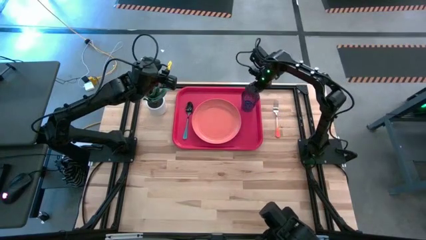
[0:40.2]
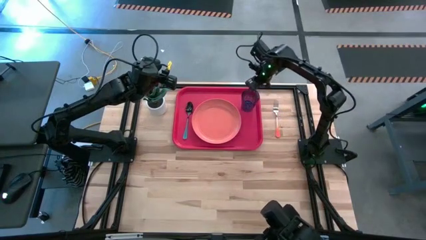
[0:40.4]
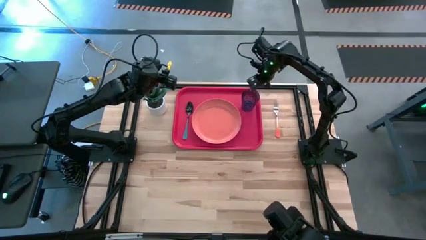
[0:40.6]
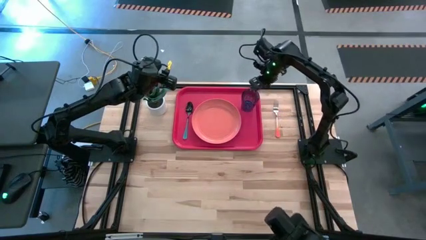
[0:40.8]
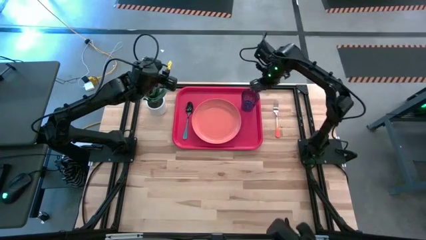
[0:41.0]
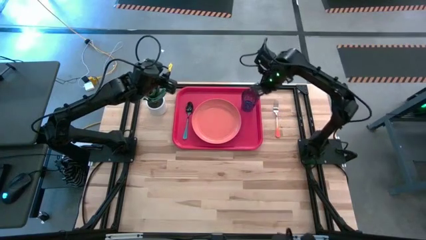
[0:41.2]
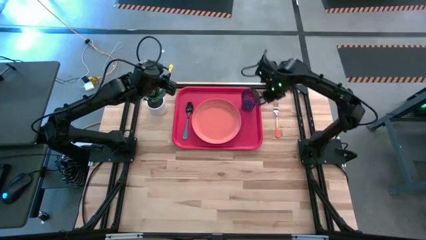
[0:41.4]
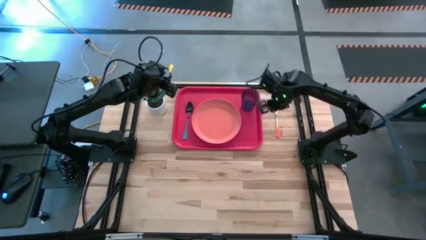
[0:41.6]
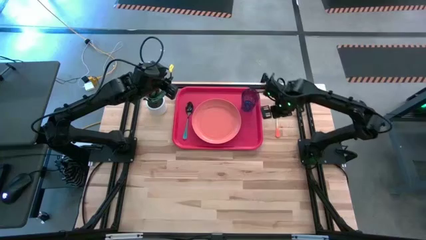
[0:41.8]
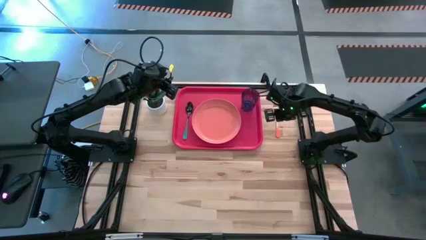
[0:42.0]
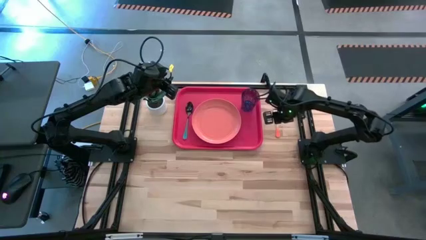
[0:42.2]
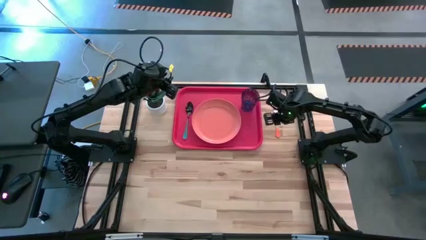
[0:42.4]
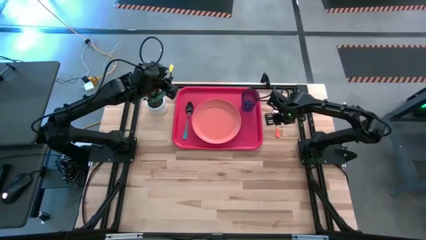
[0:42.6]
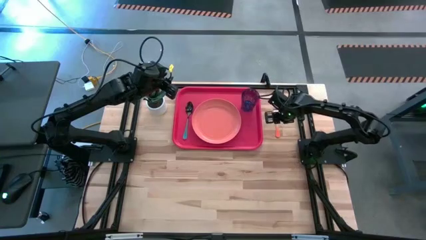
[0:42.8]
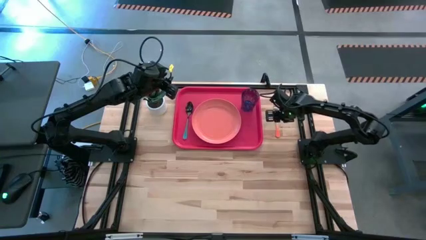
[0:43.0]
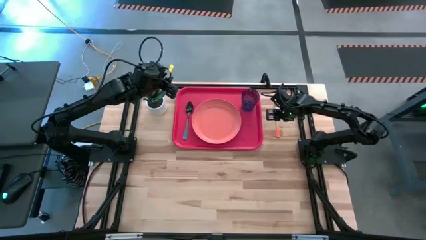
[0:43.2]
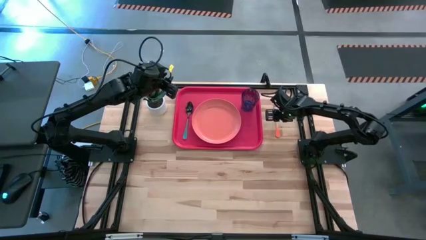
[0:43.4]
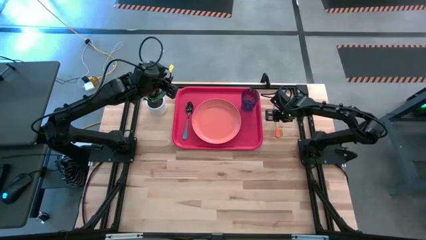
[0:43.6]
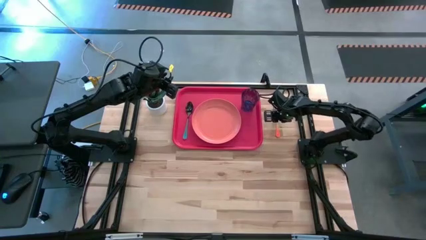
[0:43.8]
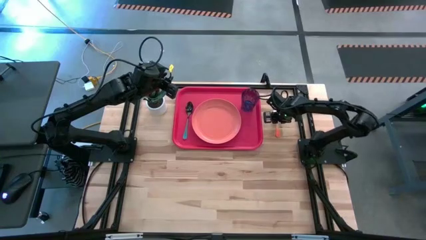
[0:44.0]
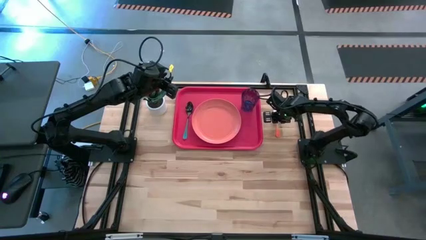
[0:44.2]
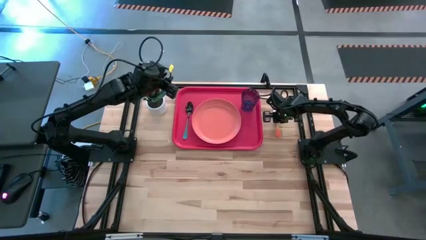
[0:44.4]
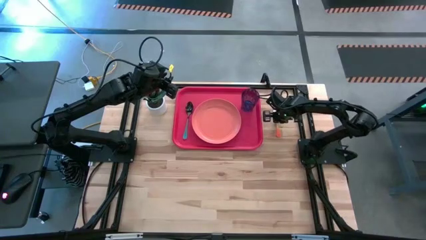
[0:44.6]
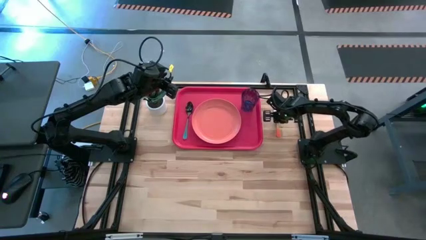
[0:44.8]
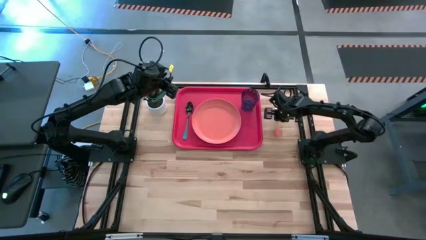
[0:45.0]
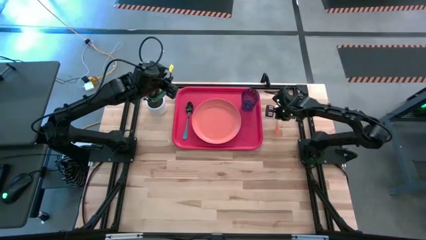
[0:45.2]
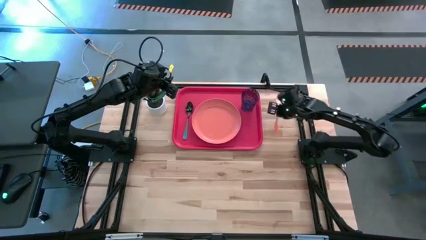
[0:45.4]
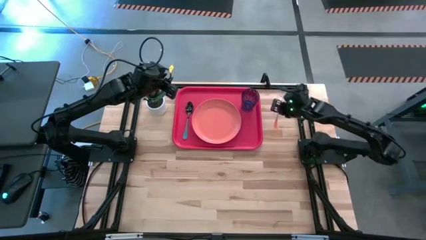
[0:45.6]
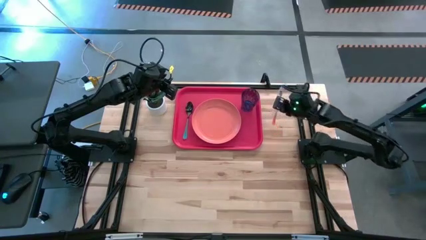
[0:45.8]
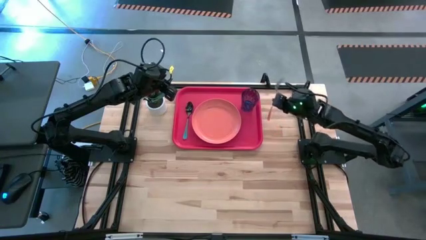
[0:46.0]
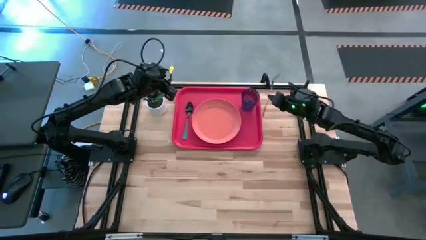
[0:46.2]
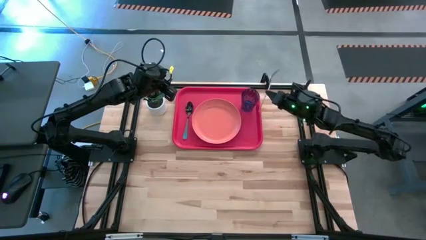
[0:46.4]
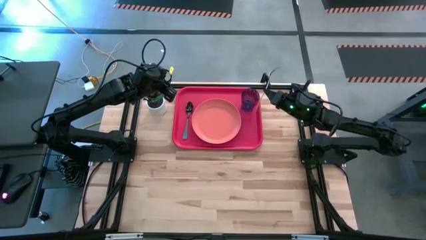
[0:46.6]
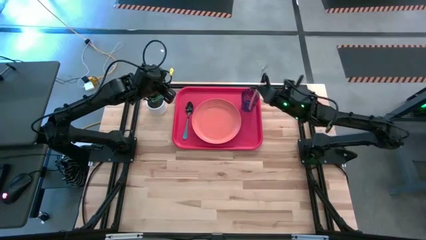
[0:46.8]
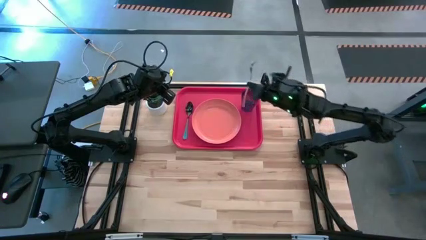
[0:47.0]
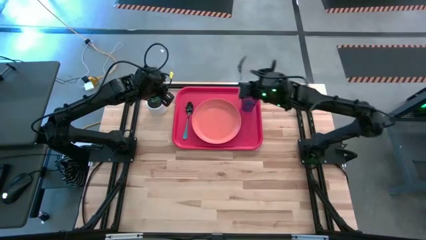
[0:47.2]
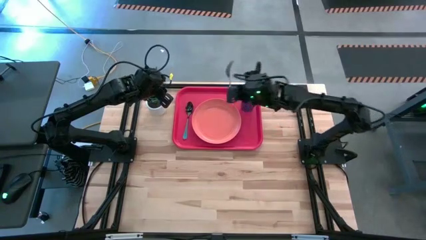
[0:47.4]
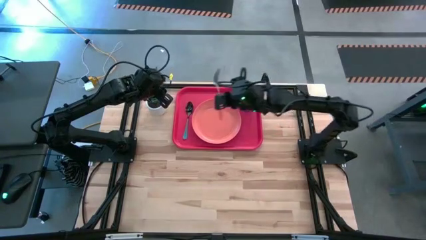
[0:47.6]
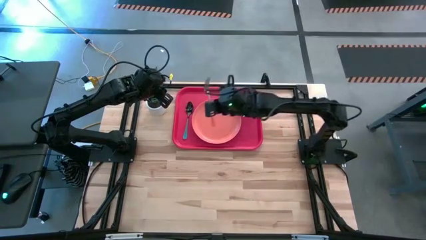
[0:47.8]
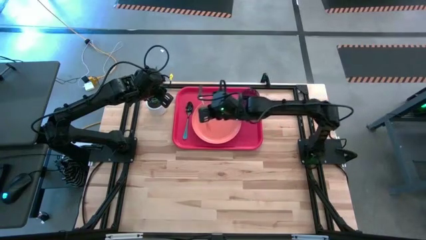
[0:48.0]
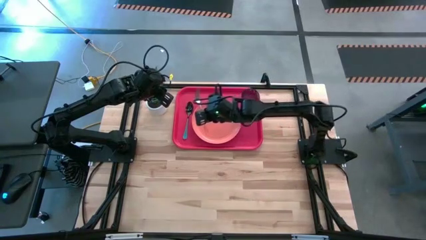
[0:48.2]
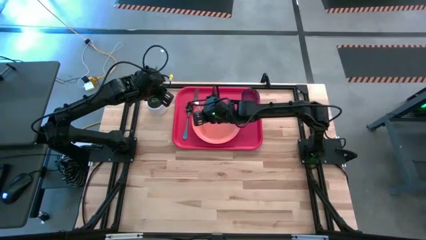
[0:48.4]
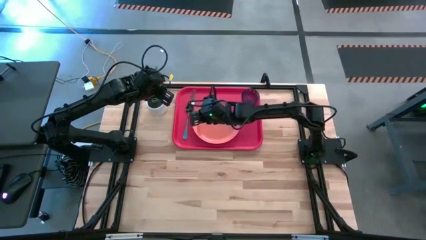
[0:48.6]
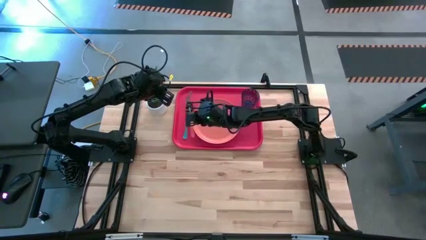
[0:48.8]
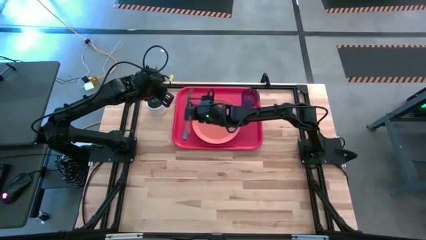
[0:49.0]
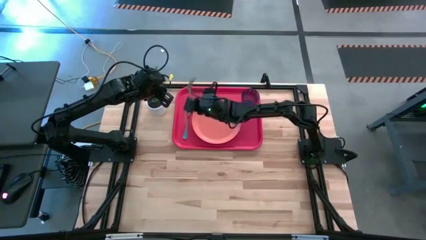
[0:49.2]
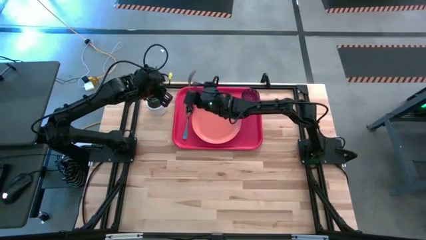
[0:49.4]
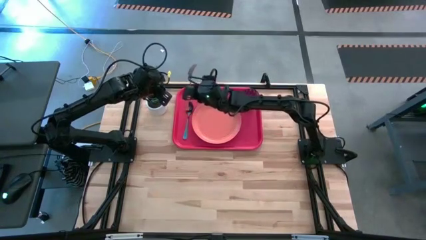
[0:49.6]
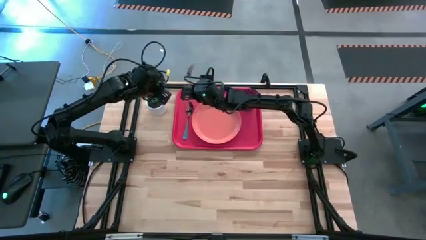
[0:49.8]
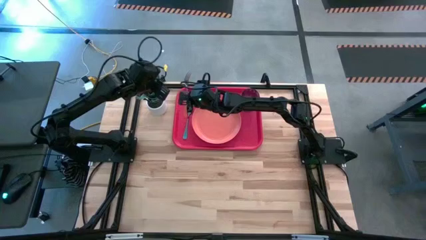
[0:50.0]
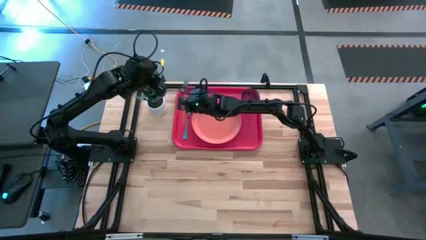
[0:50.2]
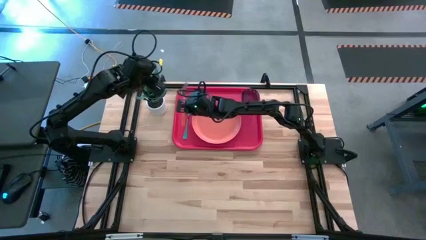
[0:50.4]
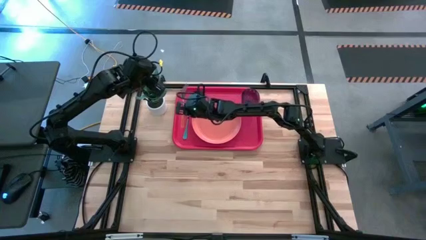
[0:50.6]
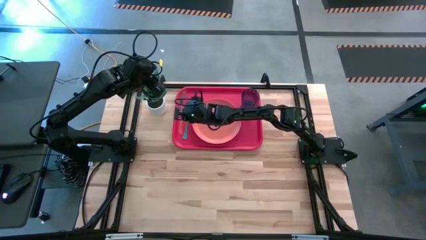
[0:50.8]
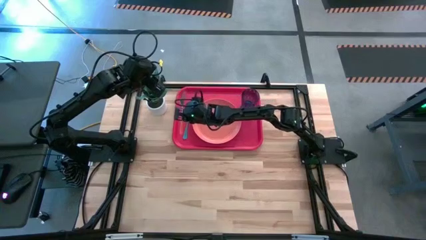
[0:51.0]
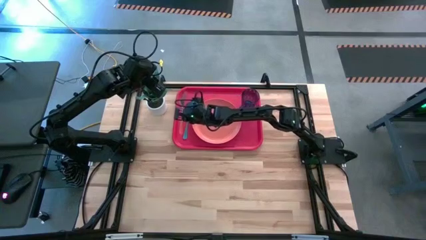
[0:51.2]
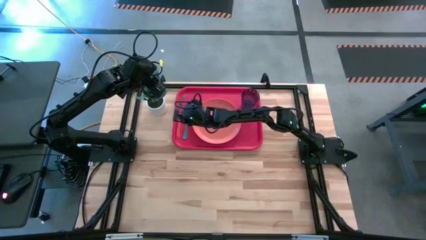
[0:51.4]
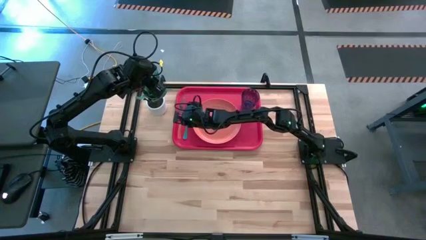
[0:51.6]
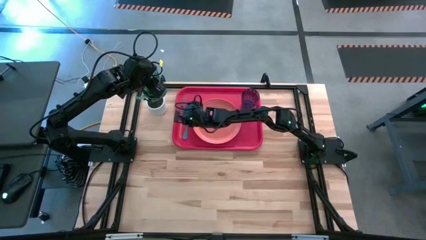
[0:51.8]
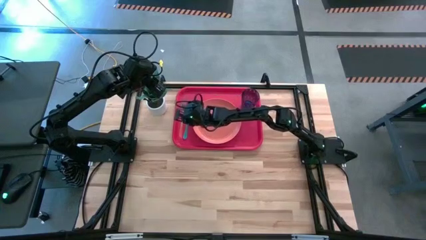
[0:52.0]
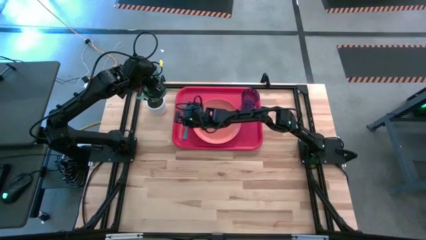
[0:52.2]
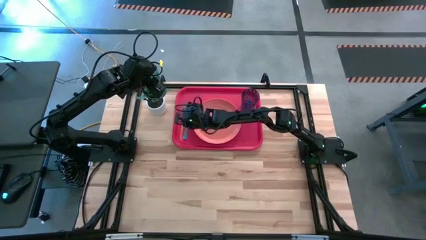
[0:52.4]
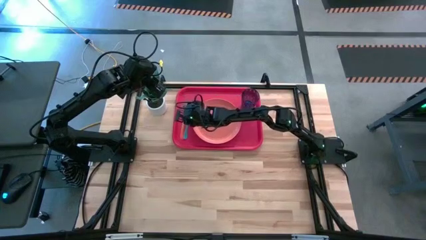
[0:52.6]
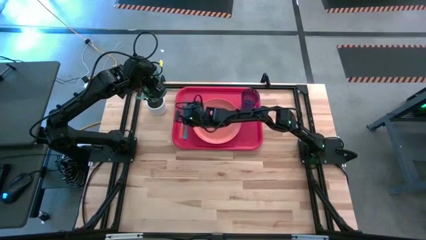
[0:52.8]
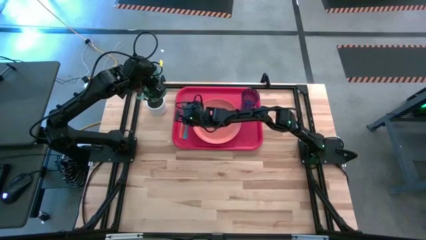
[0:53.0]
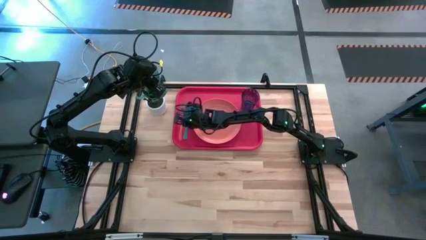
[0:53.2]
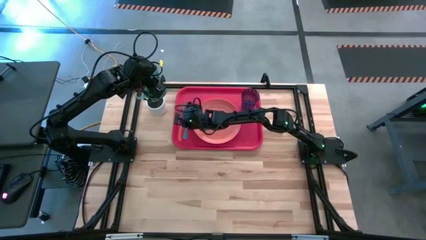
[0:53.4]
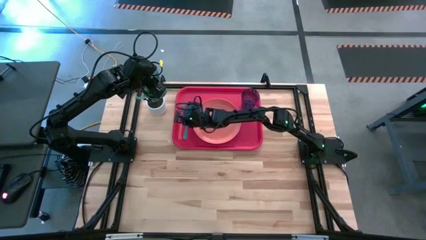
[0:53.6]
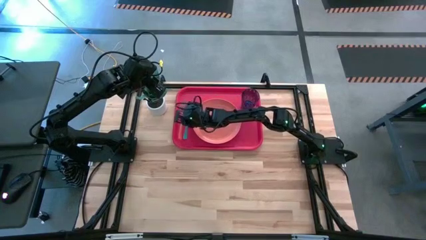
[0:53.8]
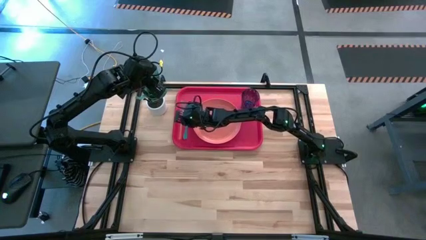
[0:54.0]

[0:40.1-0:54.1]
Task: Pick and place plate/cup/fork/spoon on tray
Put the orange fork on the pink tray to the left side of the blue spoon

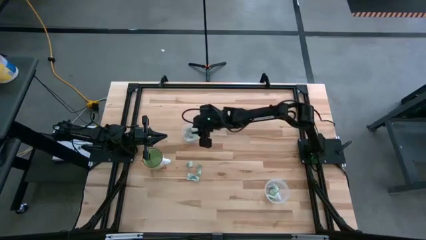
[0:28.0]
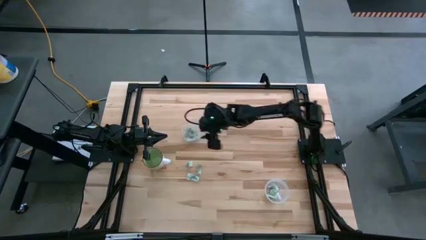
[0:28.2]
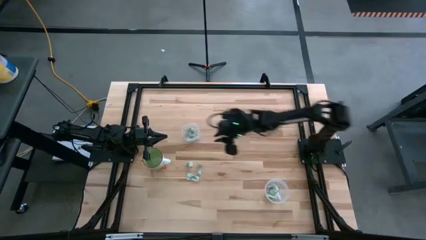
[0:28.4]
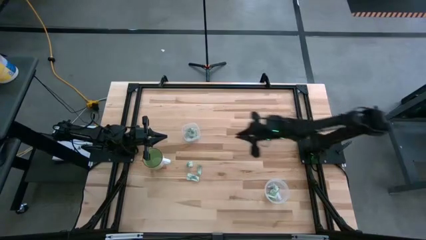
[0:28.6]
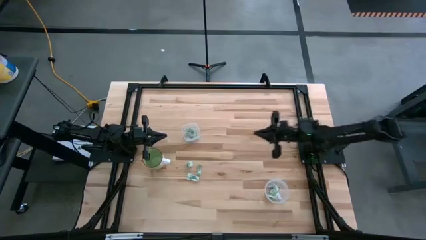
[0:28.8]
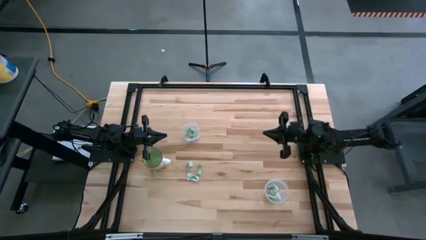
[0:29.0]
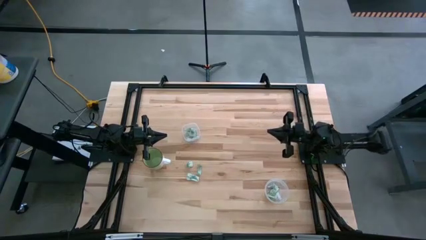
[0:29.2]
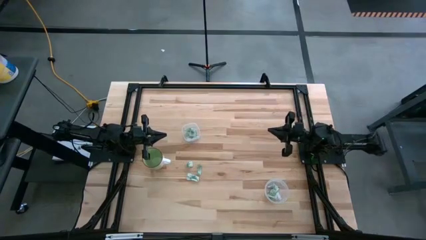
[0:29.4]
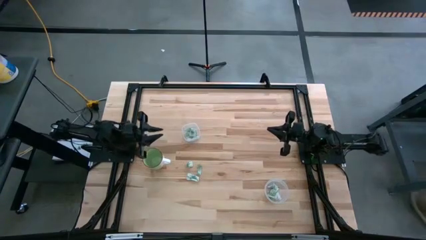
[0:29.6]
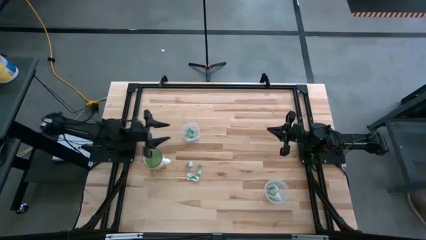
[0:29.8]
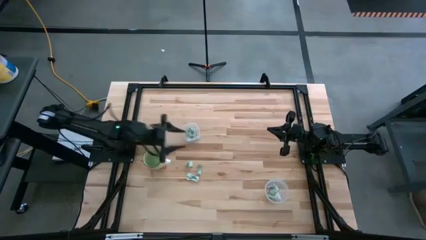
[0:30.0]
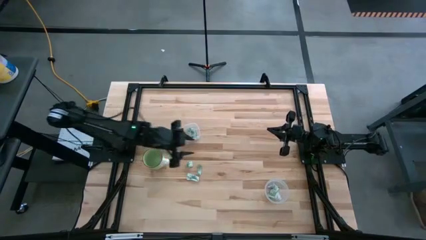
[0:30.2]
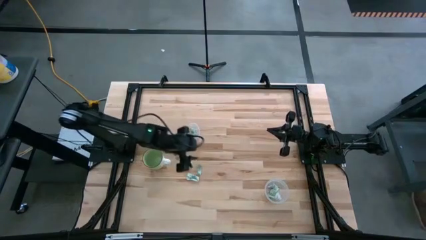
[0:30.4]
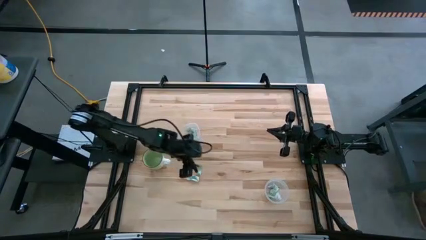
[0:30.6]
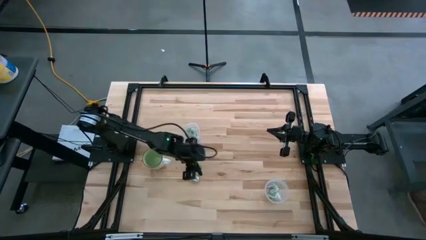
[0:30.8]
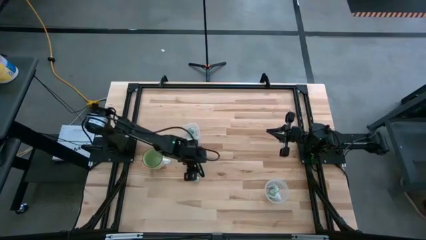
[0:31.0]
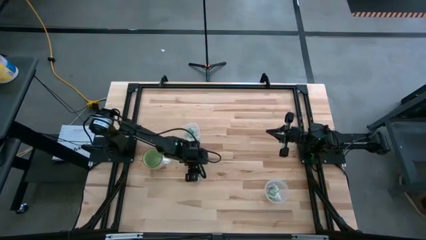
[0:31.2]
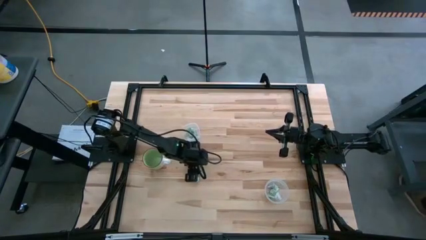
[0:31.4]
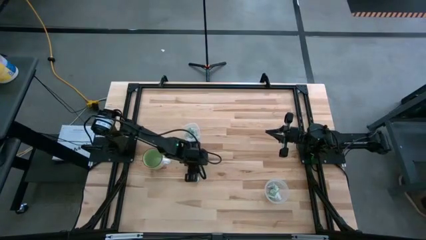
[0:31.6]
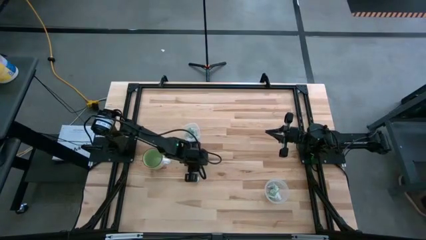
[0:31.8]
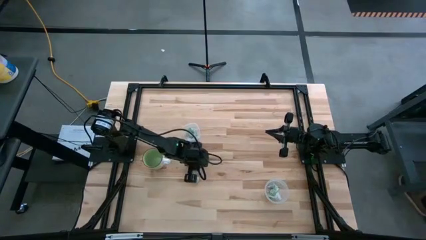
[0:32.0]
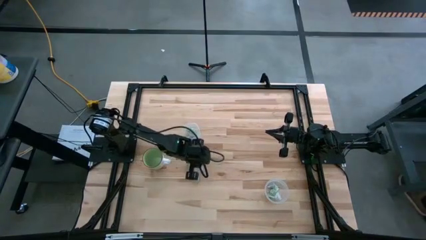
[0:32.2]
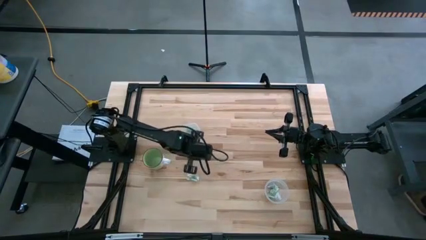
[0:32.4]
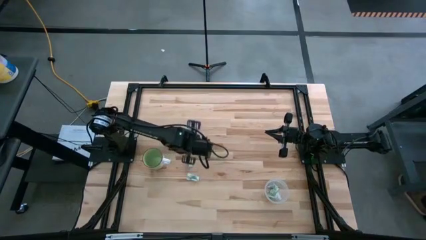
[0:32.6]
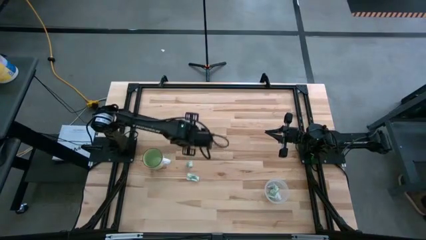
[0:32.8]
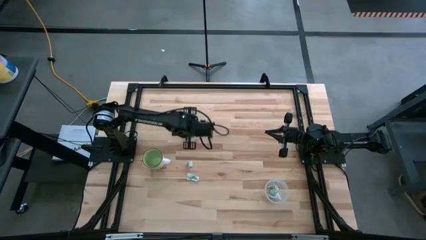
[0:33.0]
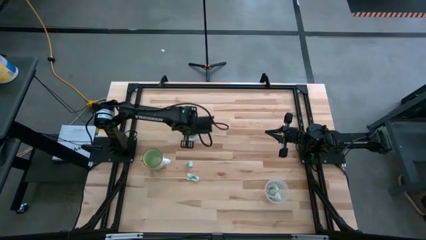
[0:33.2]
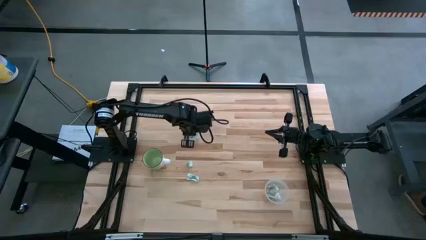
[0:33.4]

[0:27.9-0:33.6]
Task: Pick and place items into bin
Put the green stevia packet into the top transparent bin
